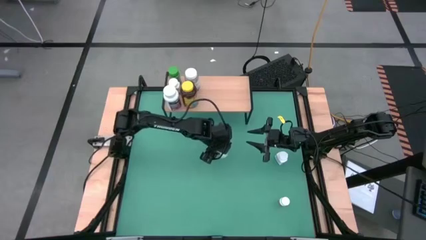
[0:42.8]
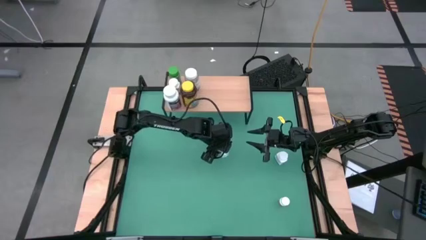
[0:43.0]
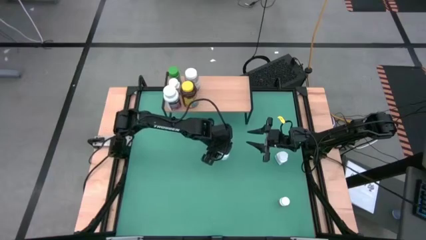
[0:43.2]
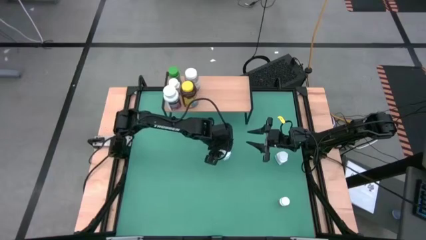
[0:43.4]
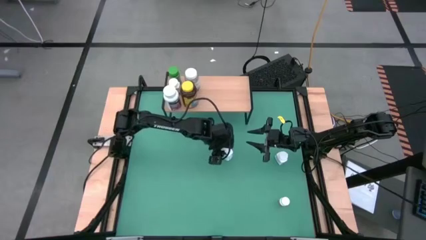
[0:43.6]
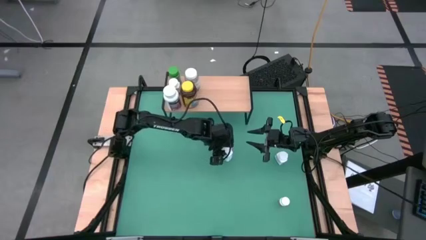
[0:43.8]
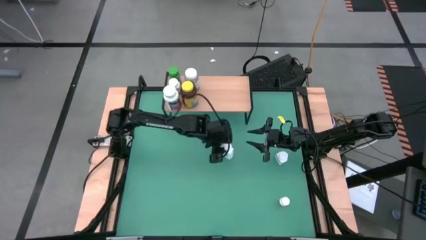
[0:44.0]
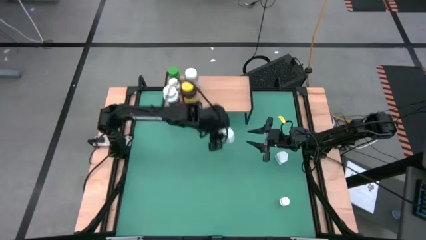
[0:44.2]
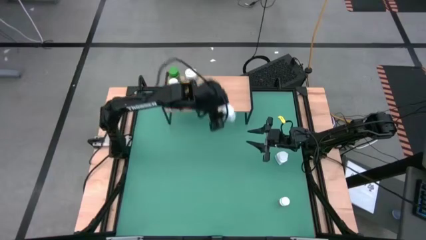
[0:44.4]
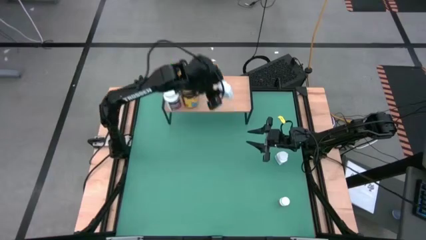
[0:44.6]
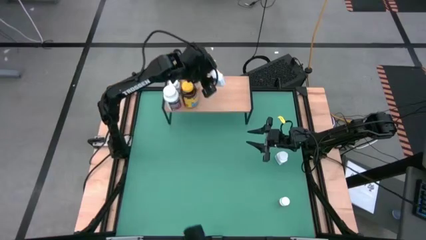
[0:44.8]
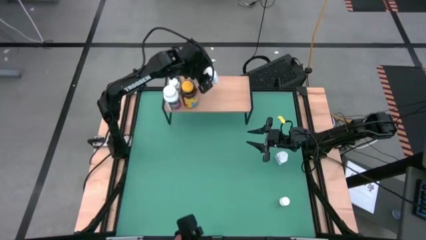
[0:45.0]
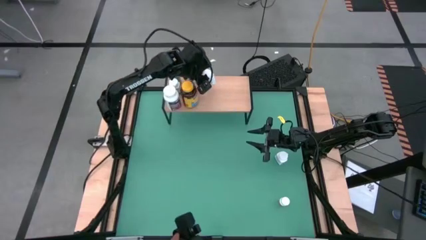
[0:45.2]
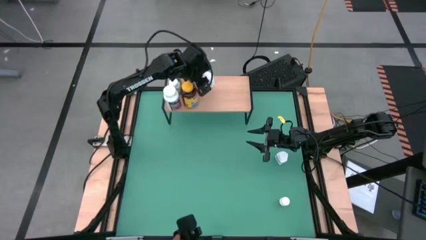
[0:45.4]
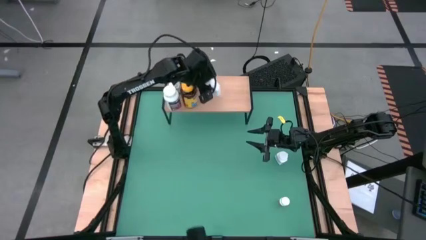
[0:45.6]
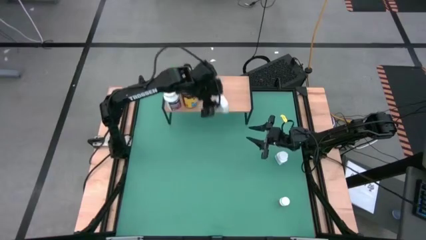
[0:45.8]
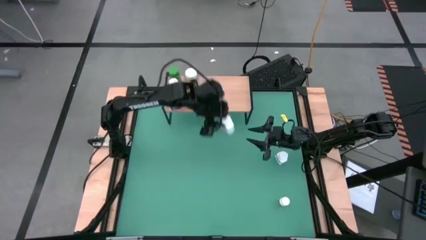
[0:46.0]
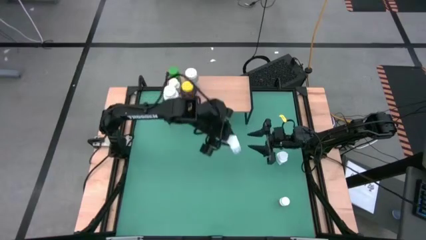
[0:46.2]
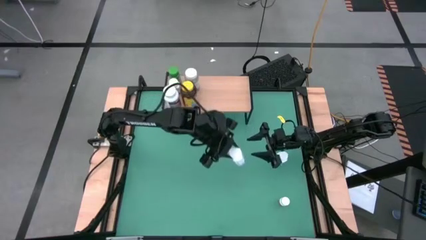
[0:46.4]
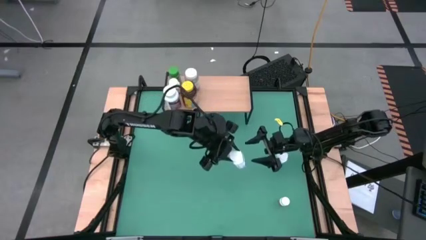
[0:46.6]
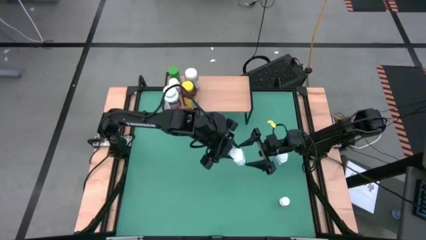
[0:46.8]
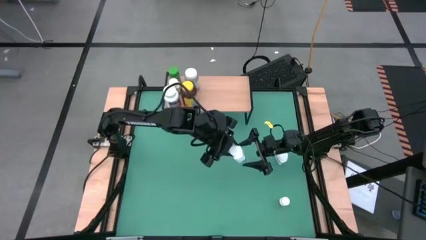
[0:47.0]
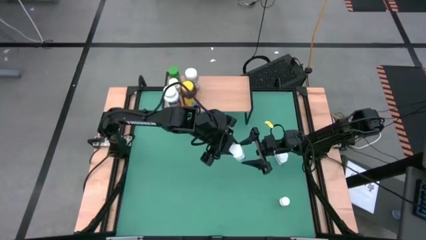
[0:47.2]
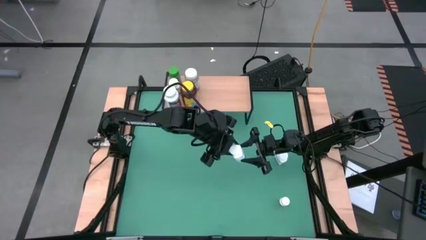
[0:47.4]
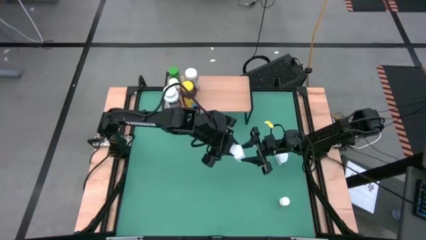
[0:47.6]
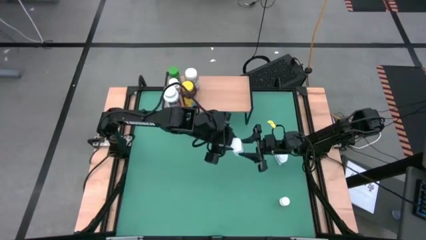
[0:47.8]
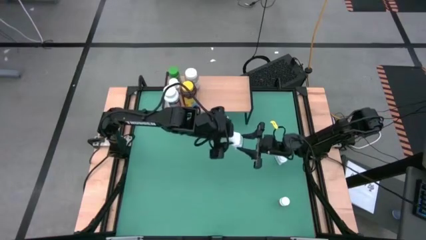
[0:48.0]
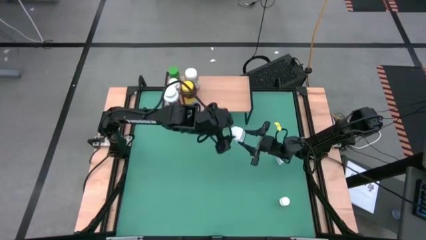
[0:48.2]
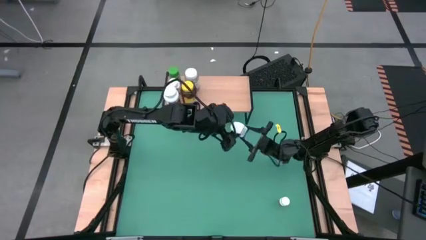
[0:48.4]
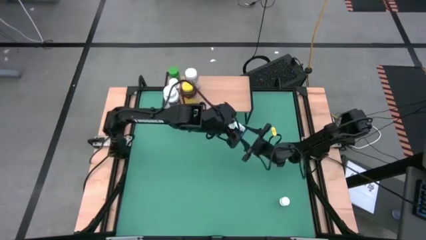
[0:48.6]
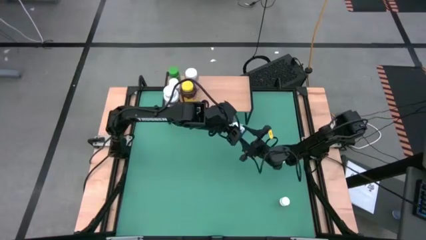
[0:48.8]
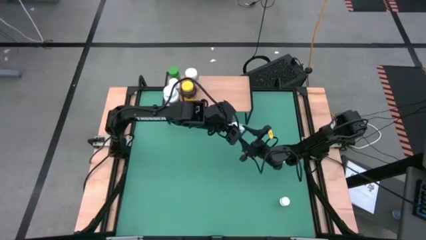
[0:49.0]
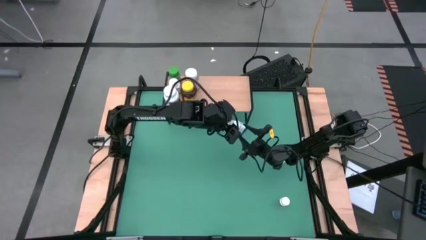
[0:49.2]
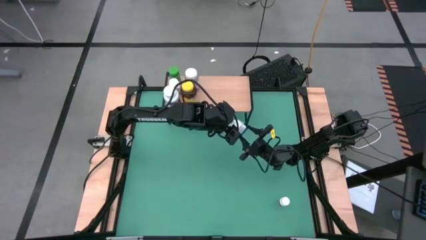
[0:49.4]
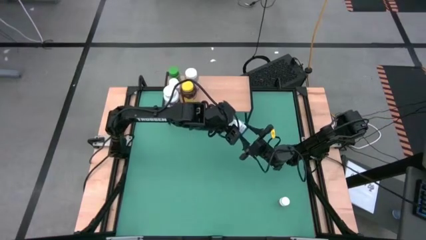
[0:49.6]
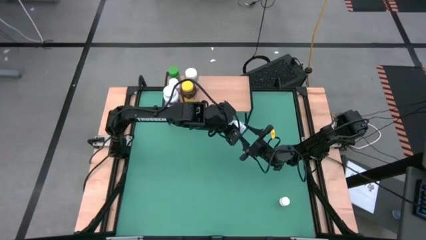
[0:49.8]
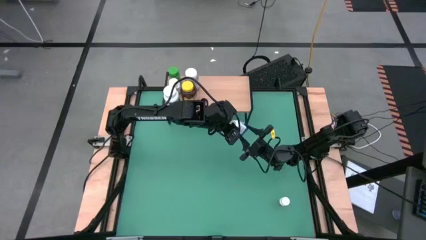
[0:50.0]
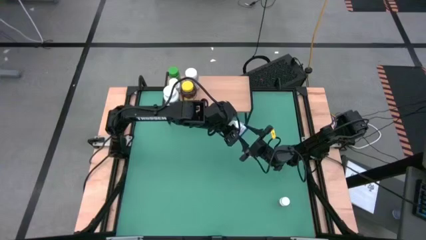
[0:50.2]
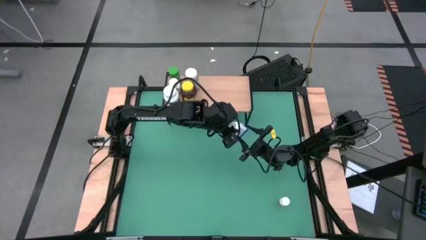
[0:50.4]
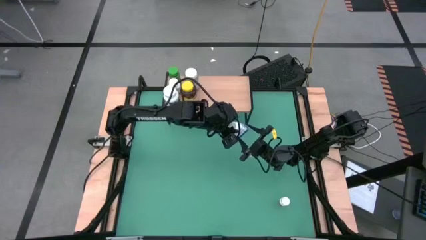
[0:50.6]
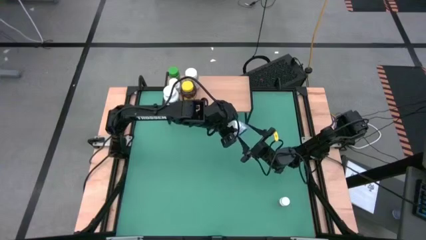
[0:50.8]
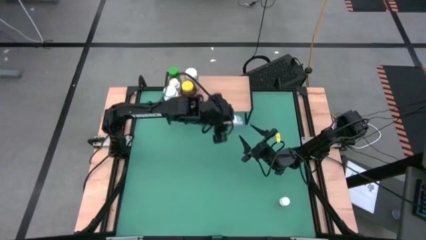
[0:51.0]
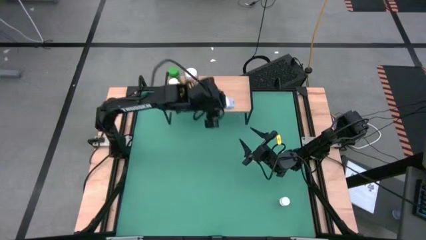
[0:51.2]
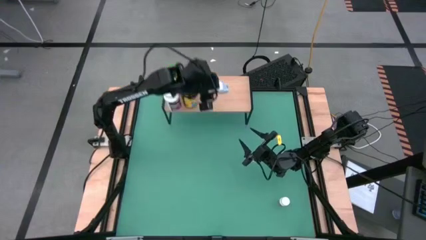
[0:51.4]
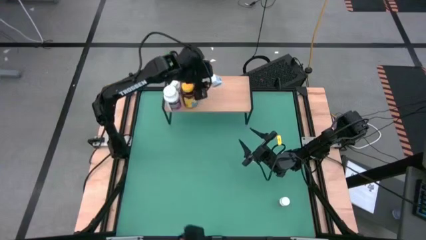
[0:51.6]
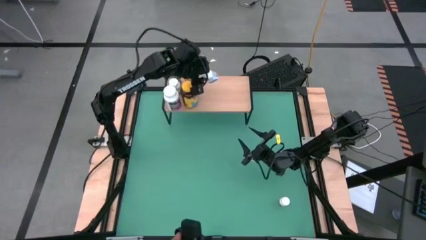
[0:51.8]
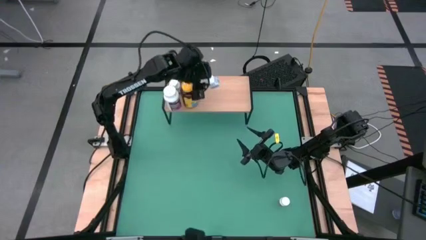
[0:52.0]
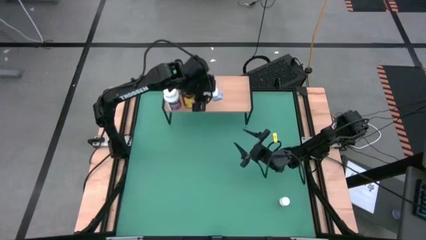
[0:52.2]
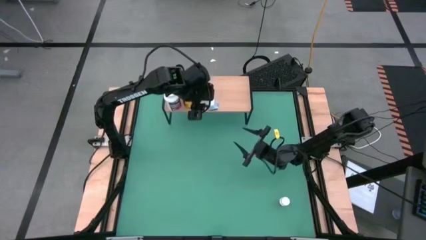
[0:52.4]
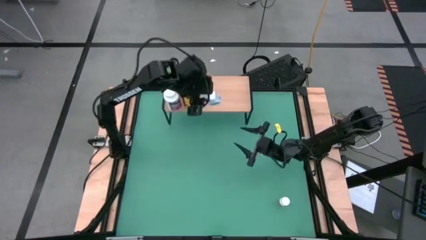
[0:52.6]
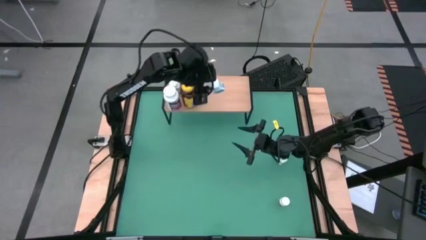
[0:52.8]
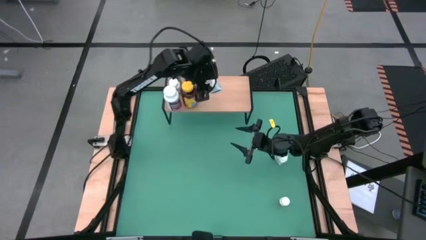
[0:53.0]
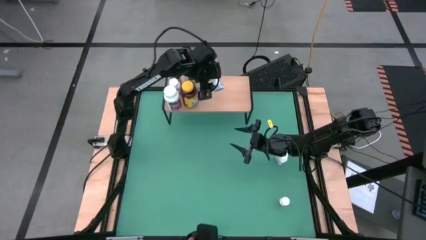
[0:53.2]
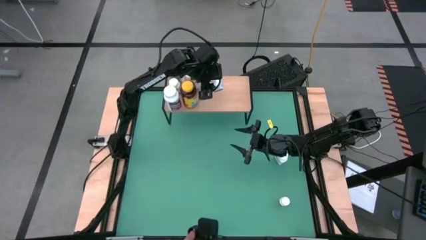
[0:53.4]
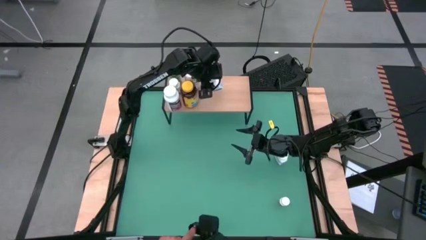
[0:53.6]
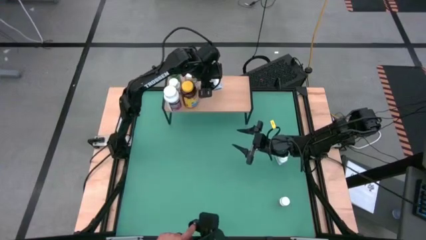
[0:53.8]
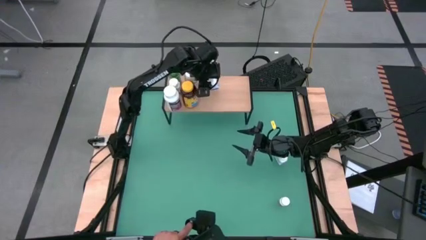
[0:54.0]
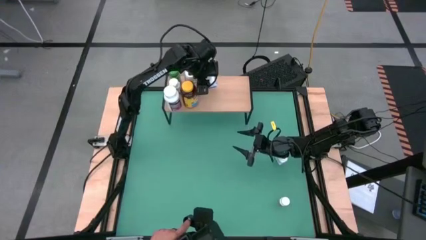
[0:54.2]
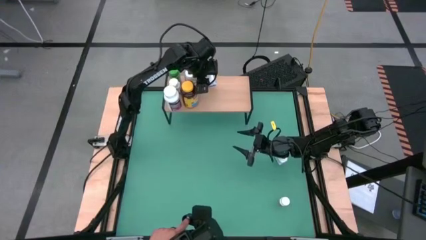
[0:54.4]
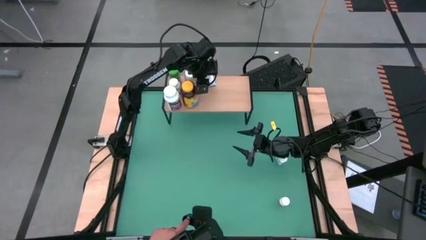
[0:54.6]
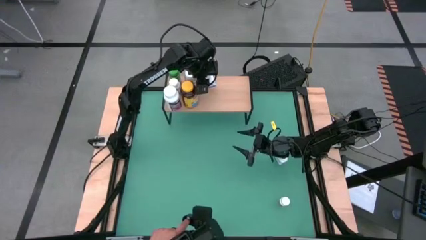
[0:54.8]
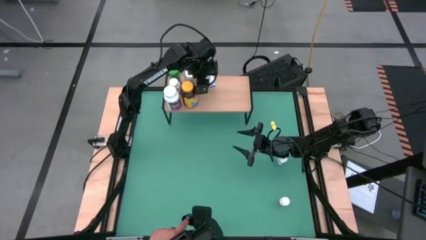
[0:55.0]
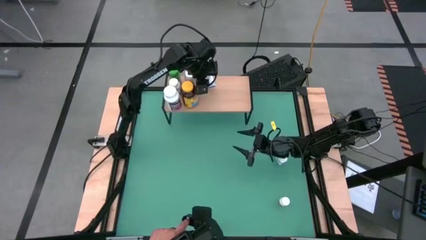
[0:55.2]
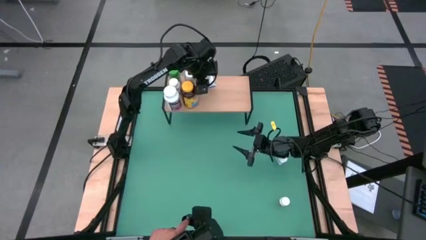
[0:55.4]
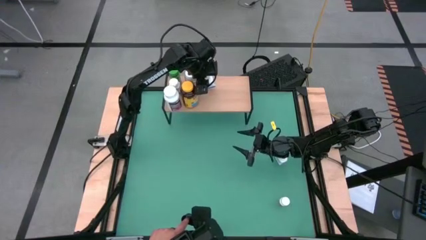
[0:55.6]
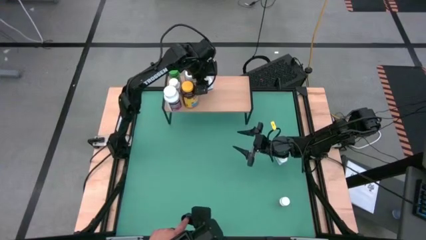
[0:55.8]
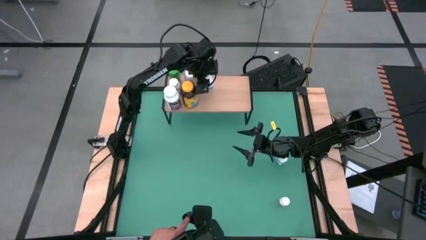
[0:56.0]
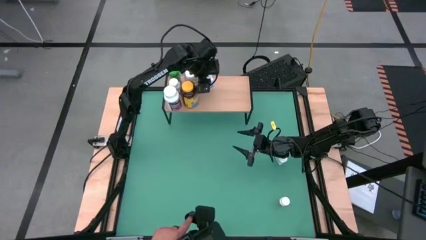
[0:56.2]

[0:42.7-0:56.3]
Task: Pick and place medicine bottles onto shelf by color
Put the left white supplement bottle on the shelf
